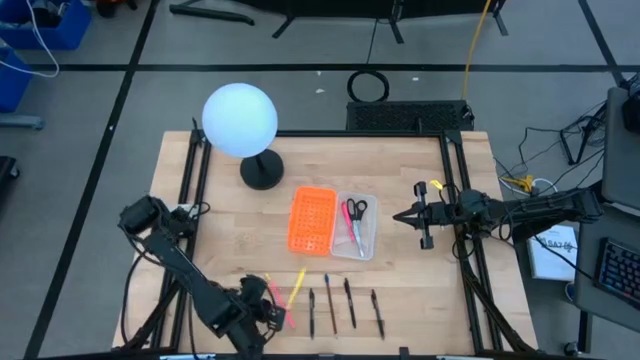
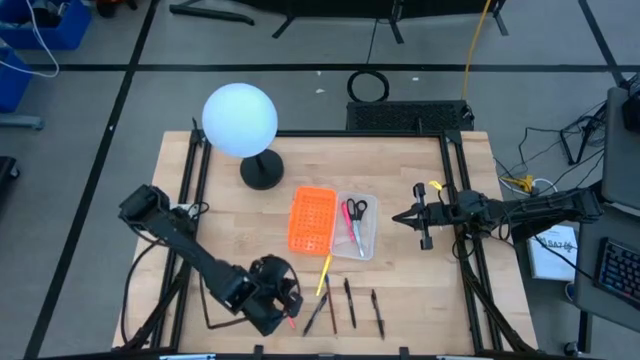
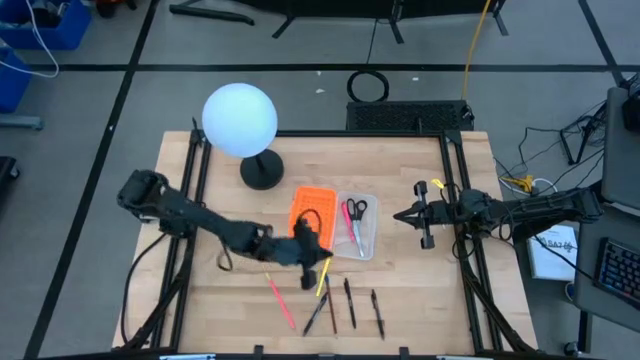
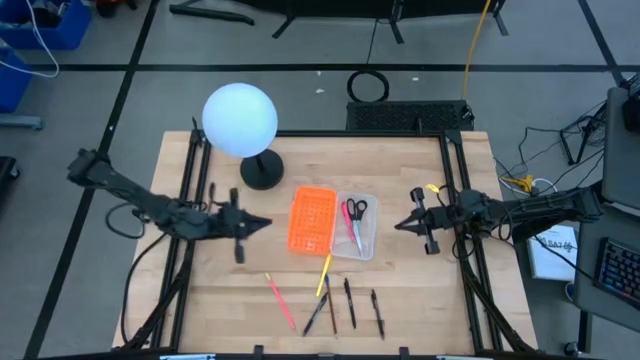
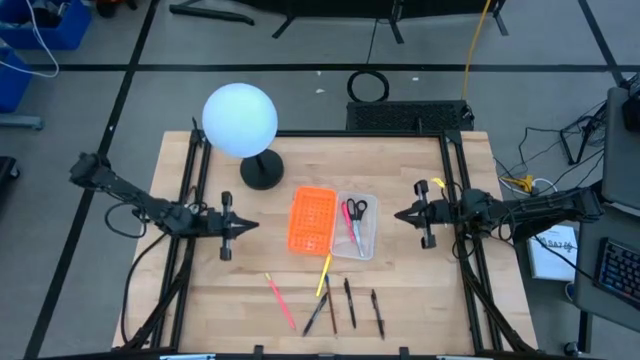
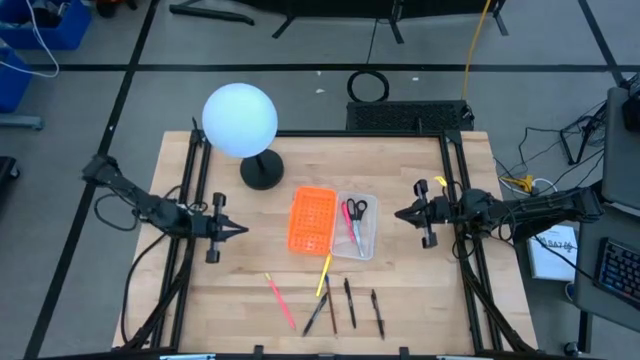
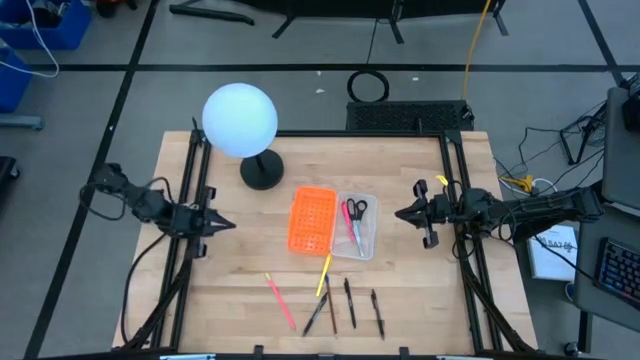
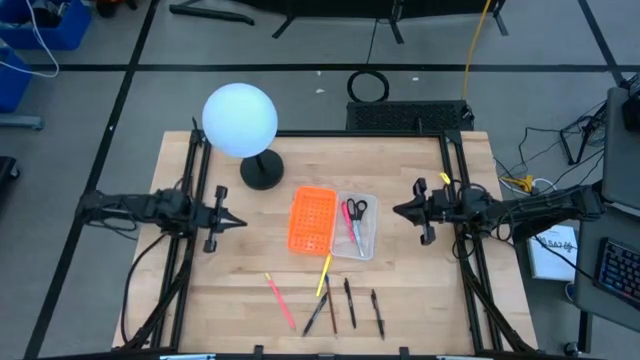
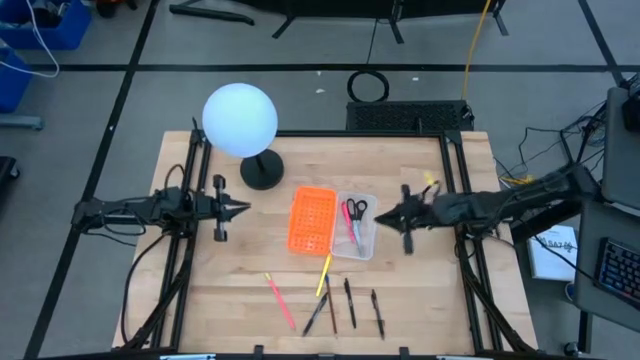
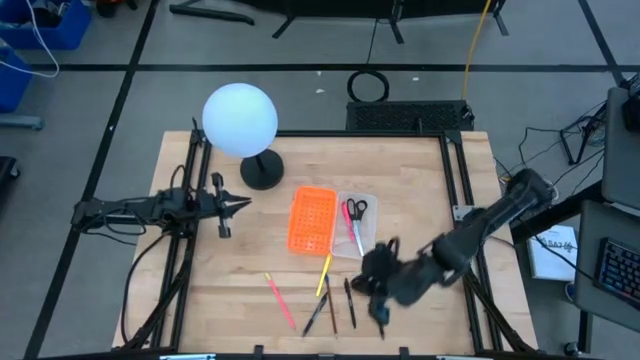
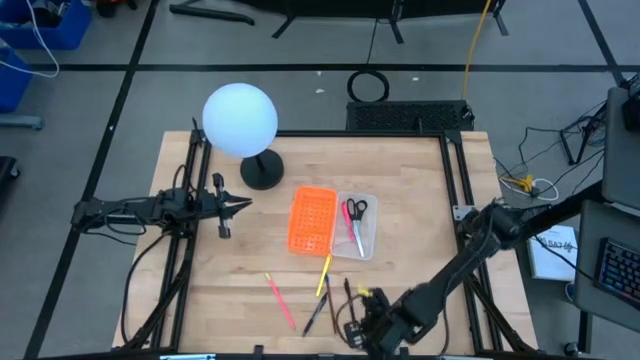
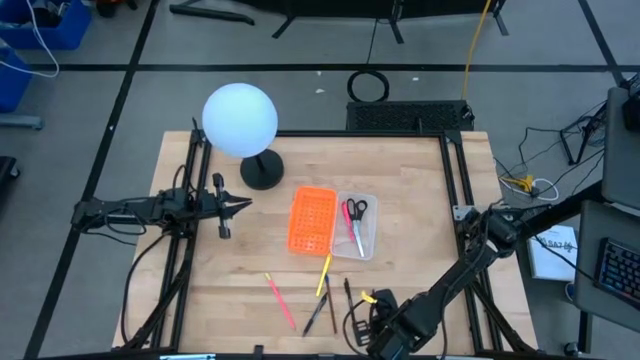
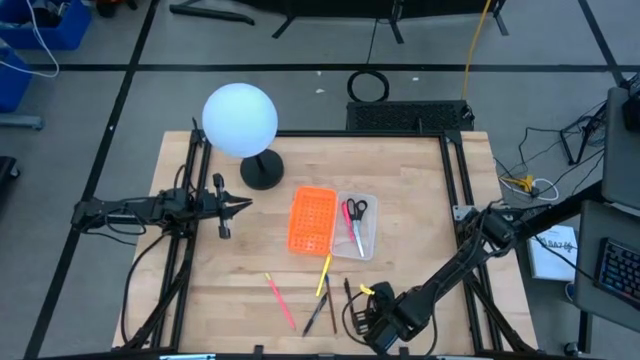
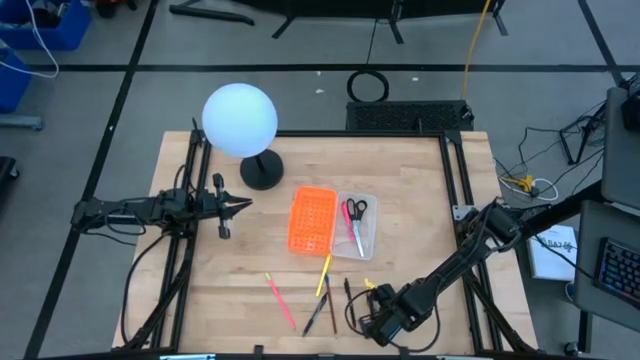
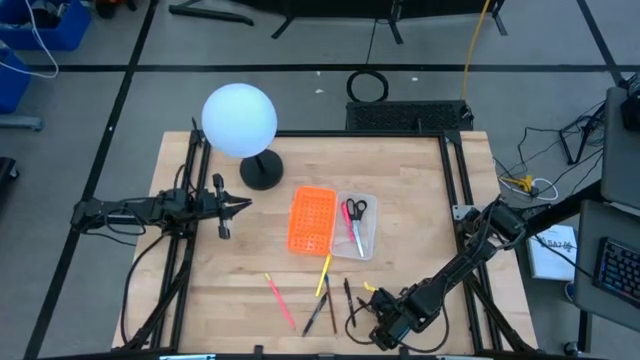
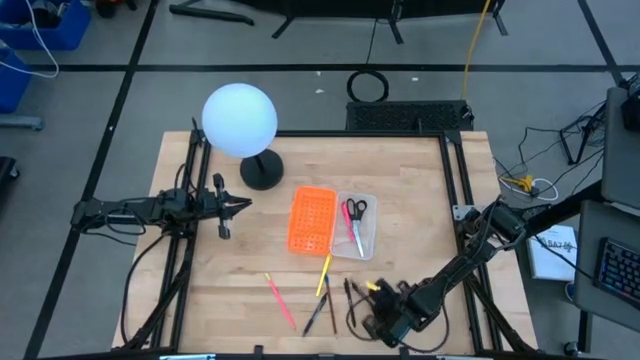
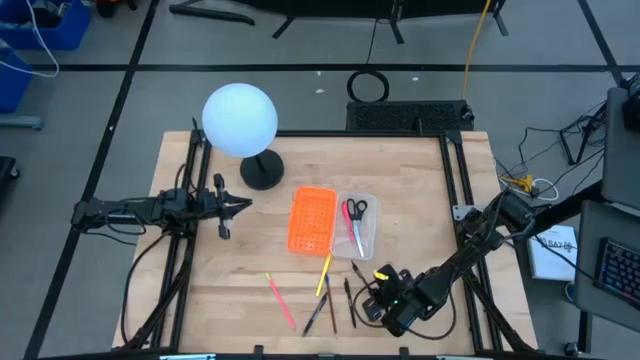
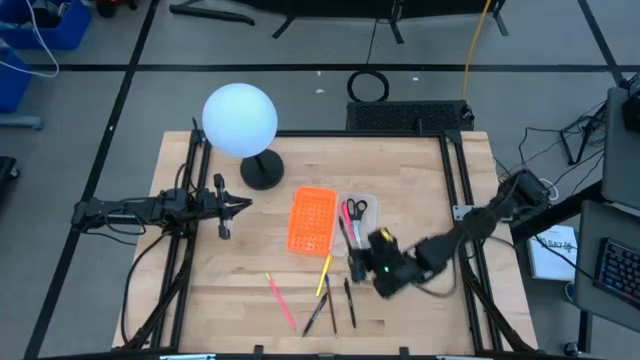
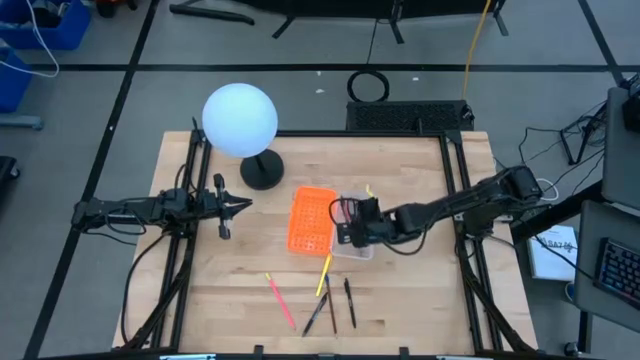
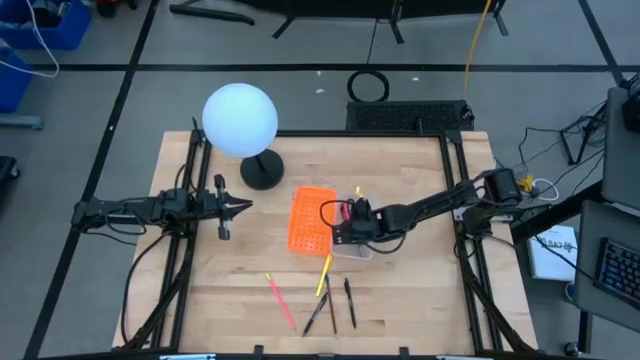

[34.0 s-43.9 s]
Task: Pick & place school supplies into a supply box
Put the right black transparent pen into the orange supply box

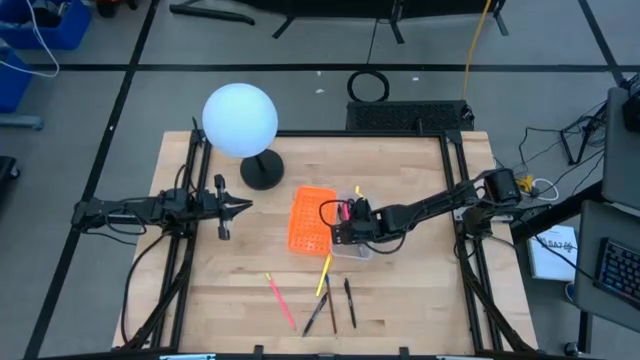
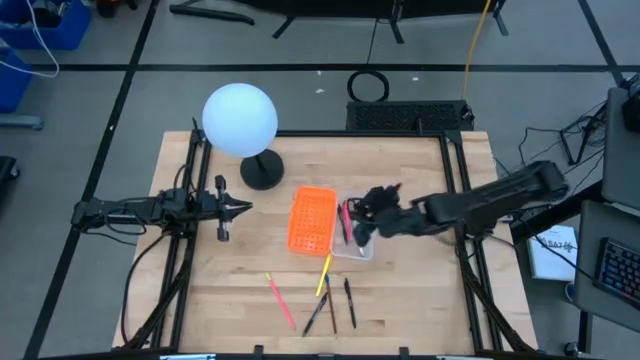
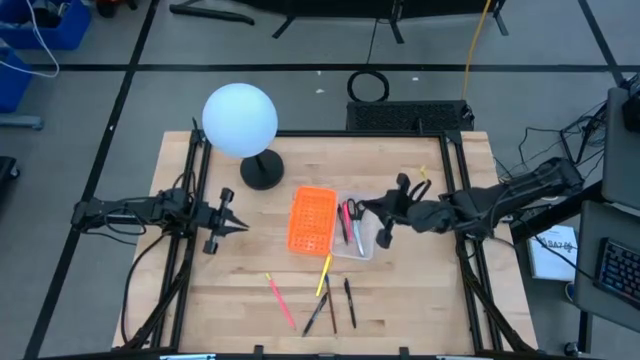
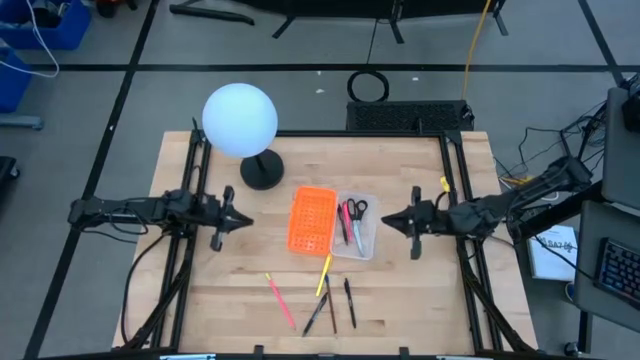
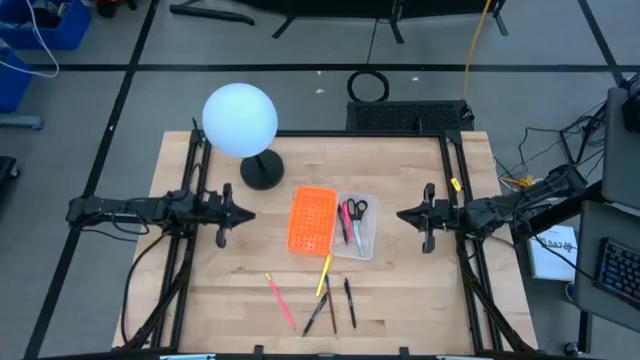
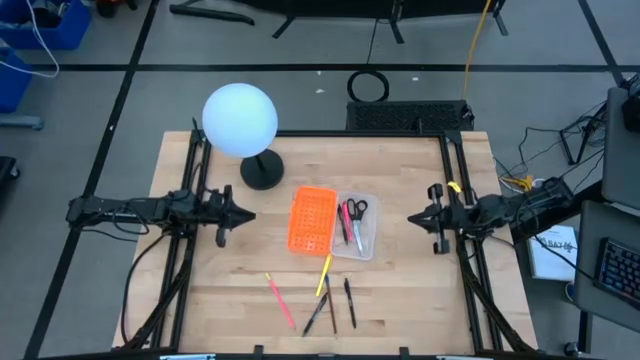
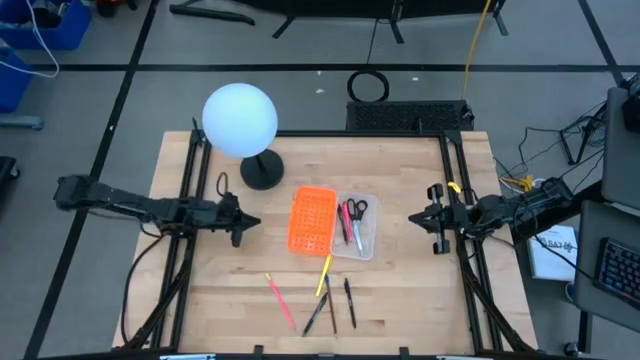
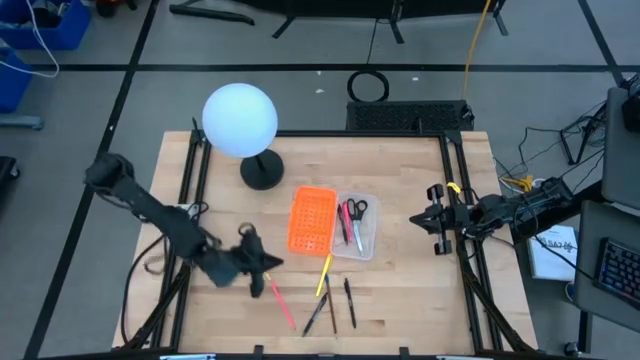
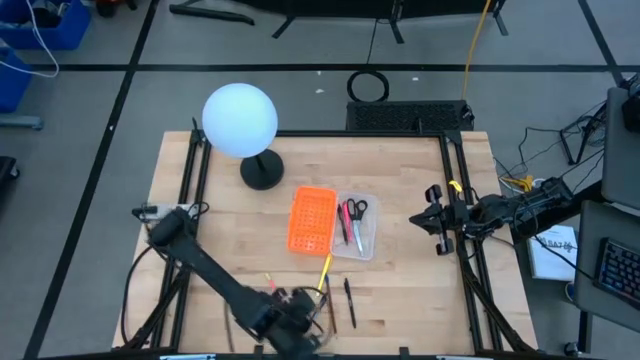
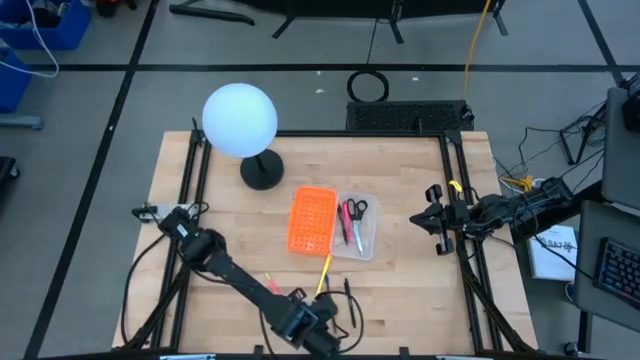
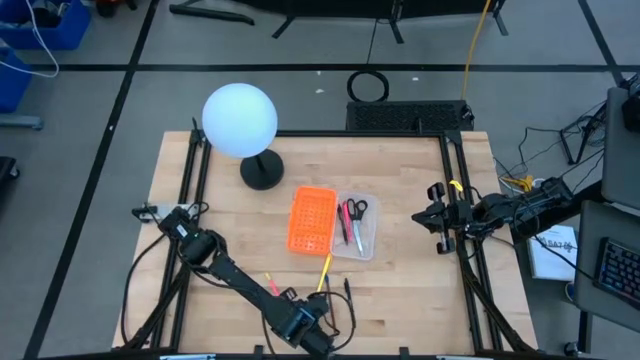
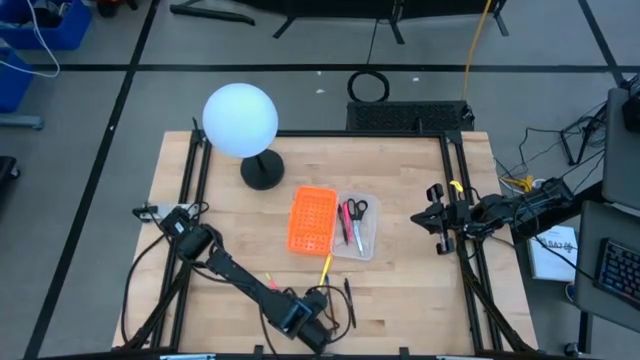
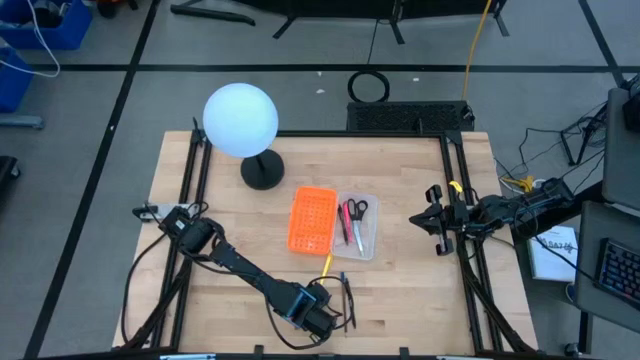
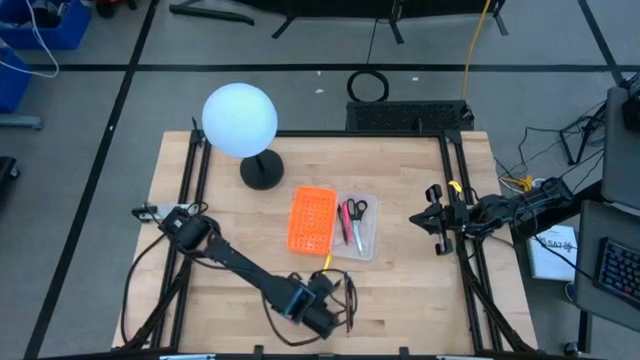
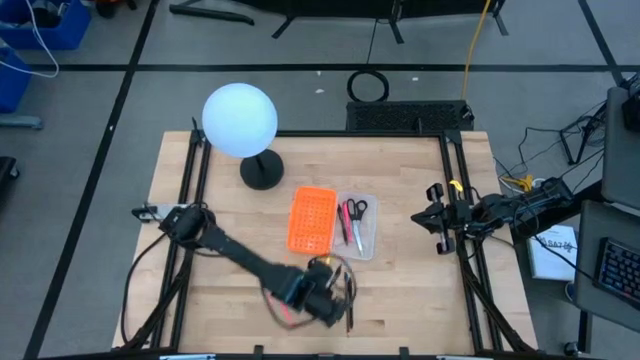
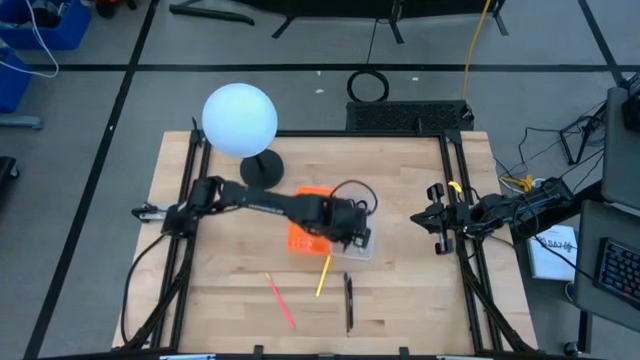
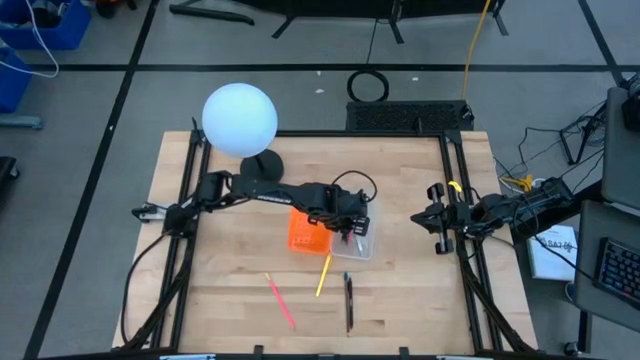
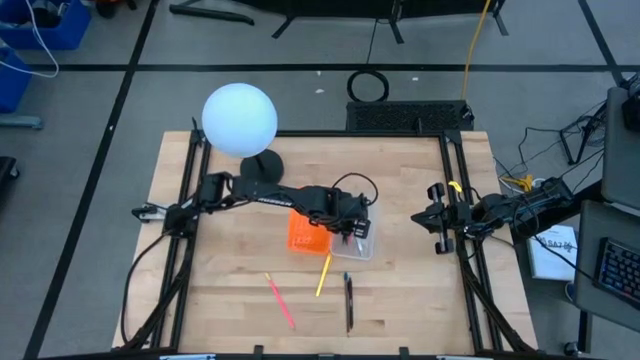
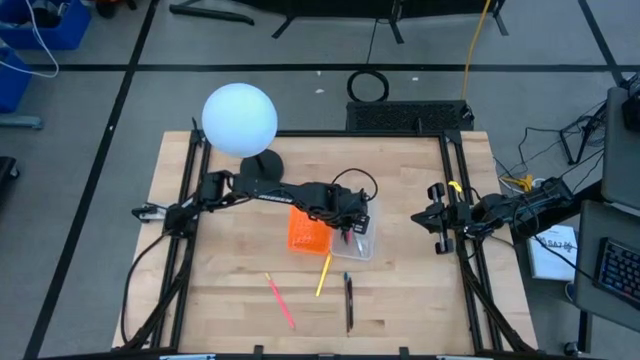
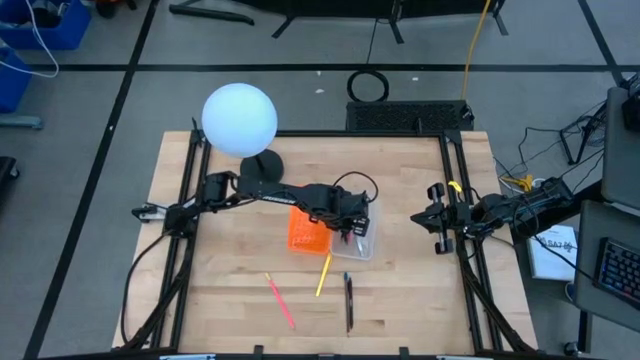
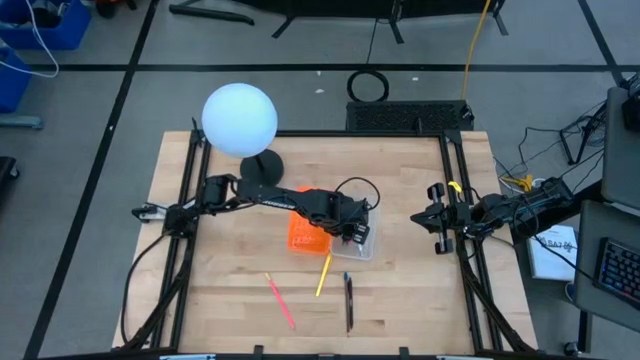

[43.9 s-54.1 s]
Put the black transparent pen into the orange supply box
